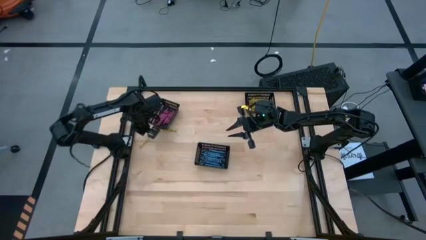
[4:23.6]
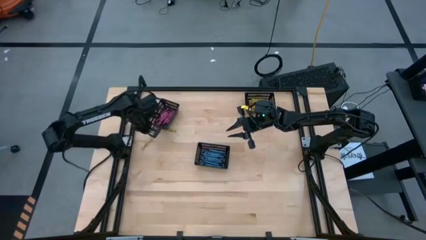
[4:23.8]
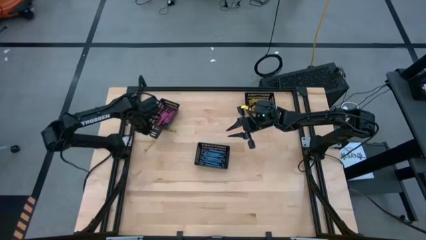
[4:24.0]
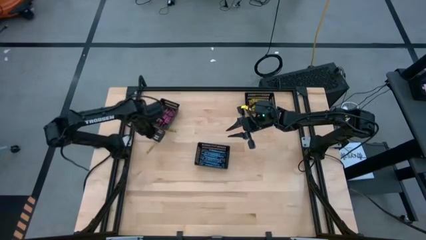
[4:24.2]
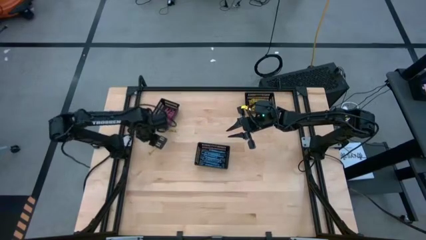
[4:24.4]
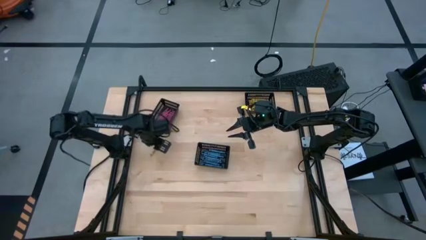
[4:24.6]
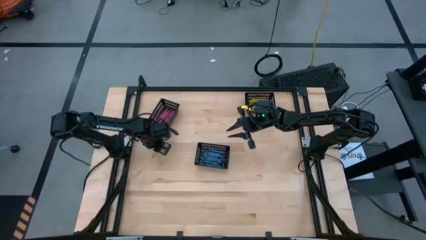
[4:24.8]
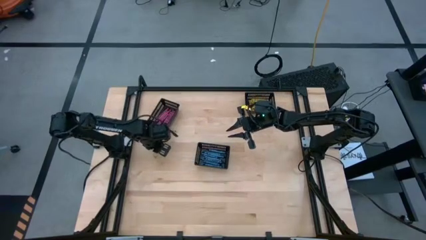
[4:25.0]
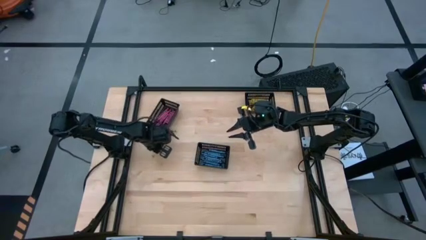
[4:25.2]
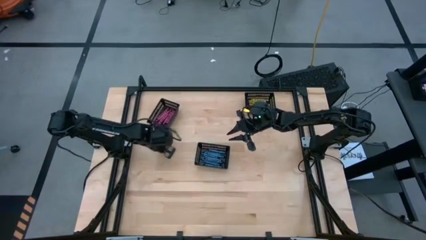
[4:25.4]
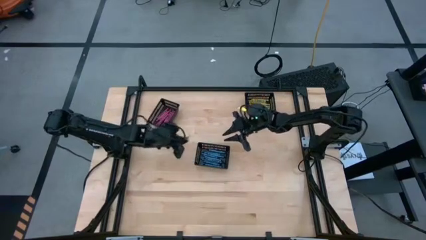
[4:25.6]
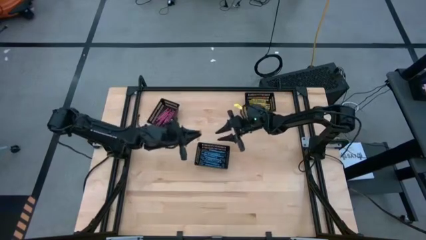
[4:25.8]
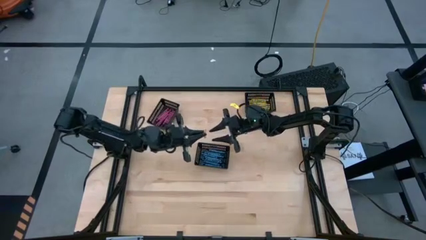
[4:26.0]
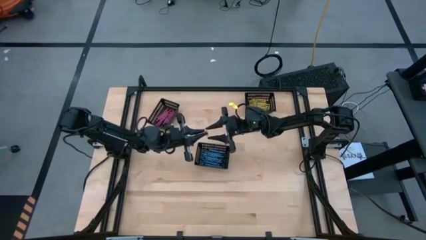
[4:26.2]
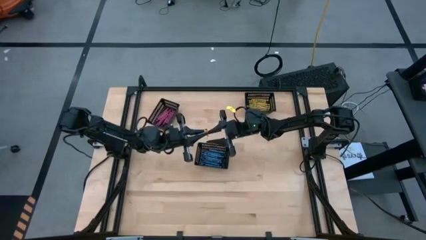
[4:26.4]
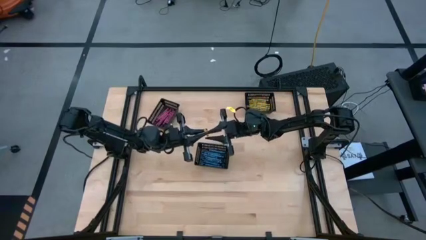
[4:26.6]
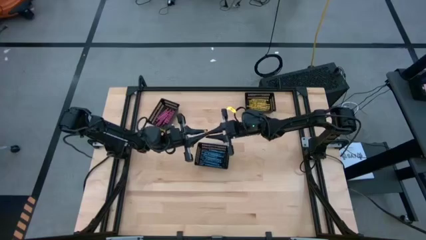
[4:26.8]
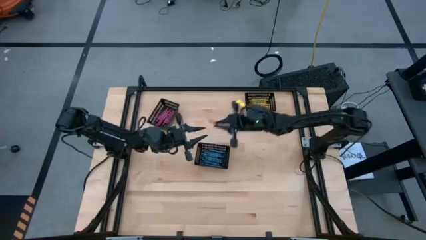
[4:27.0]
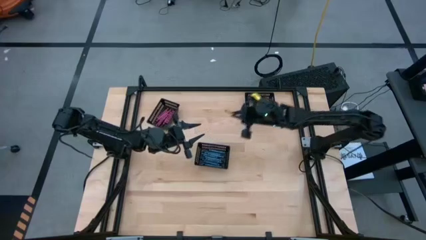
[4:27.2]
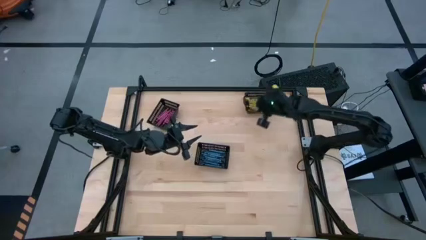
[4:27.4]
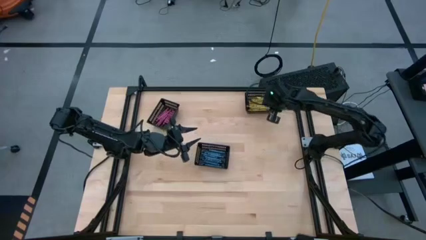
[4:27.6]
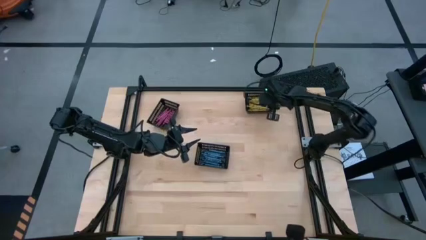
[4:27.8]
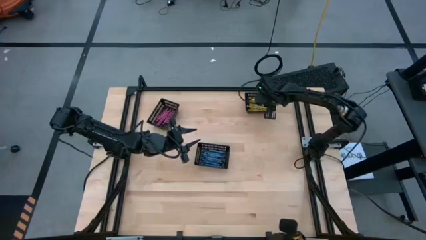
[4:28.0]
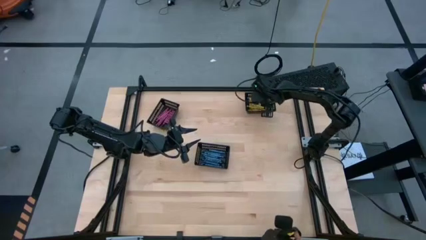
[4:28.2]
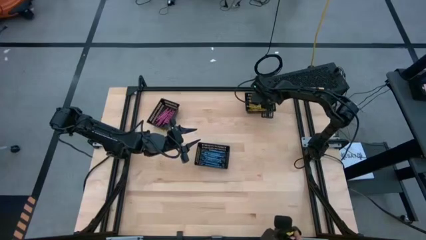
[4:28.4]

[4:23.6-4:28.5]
Task: Sort crayons
Put the yellow crayon into the top right black bin

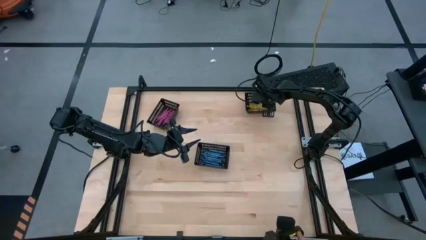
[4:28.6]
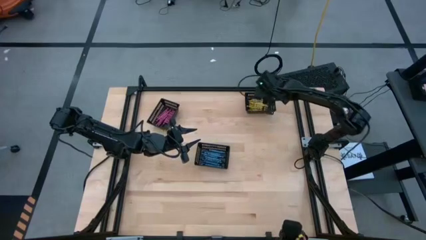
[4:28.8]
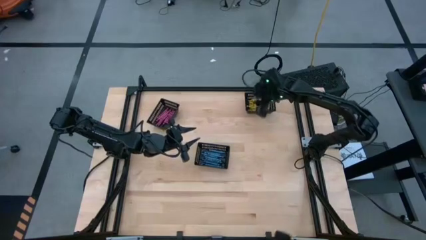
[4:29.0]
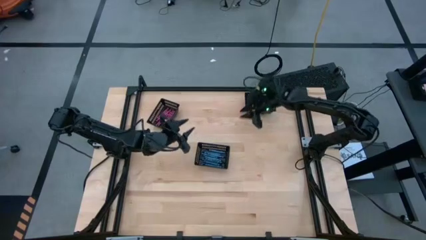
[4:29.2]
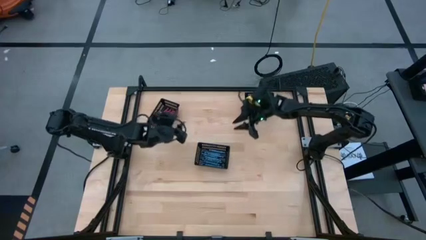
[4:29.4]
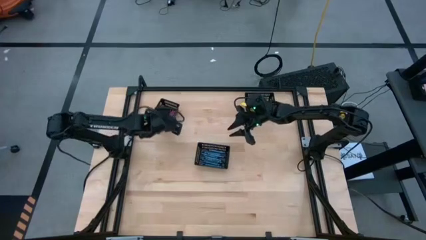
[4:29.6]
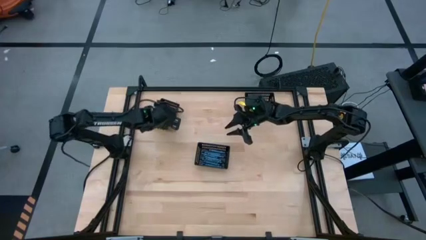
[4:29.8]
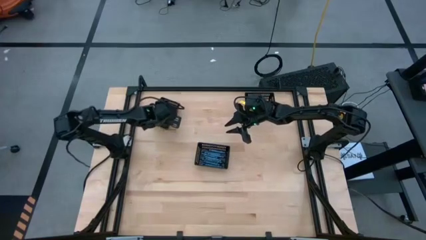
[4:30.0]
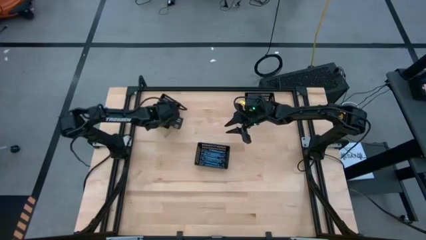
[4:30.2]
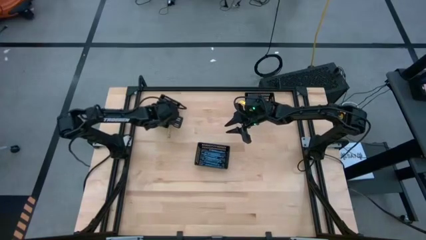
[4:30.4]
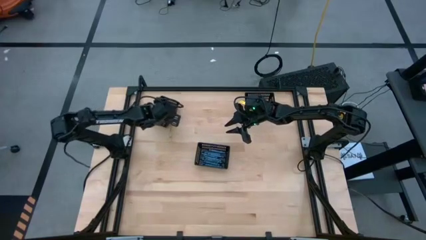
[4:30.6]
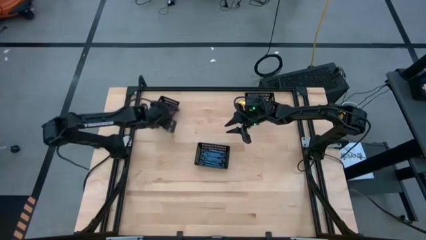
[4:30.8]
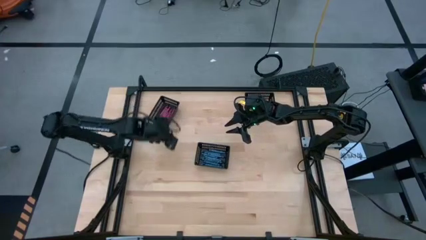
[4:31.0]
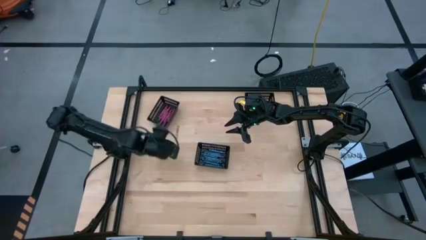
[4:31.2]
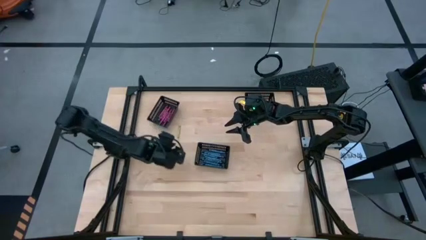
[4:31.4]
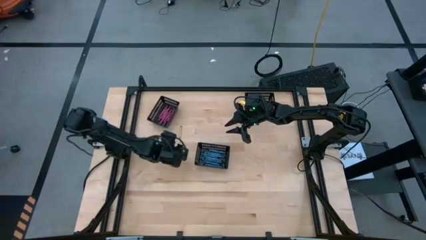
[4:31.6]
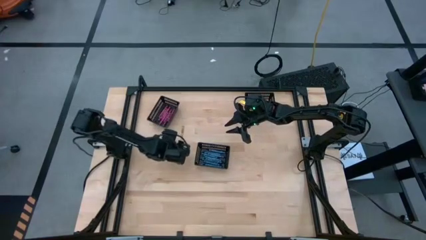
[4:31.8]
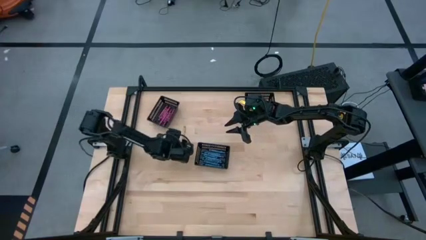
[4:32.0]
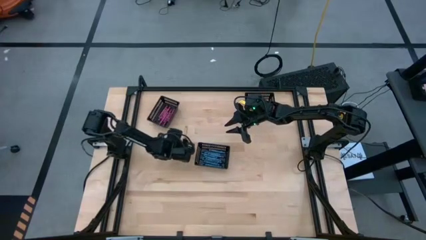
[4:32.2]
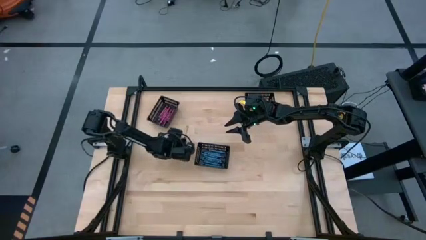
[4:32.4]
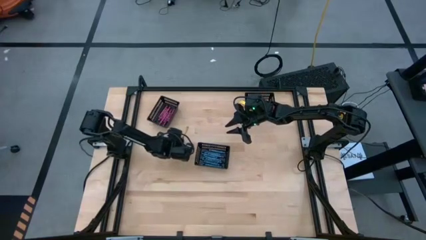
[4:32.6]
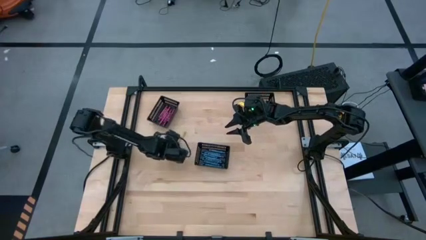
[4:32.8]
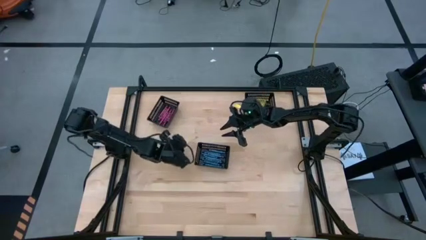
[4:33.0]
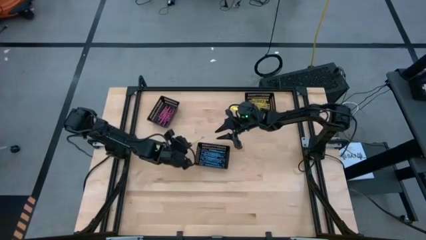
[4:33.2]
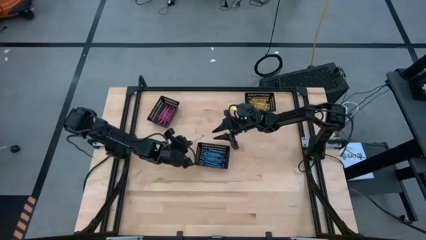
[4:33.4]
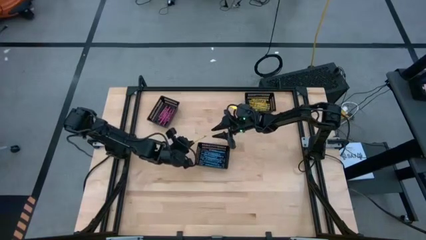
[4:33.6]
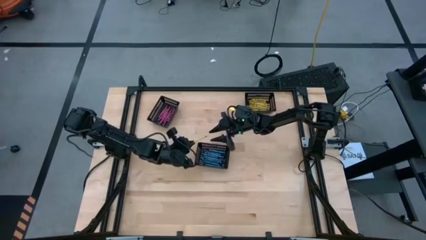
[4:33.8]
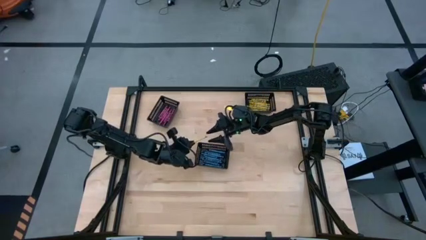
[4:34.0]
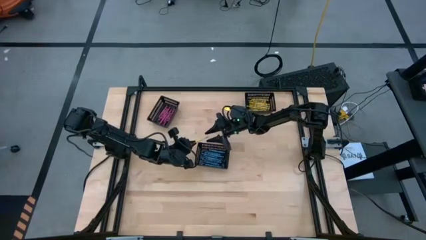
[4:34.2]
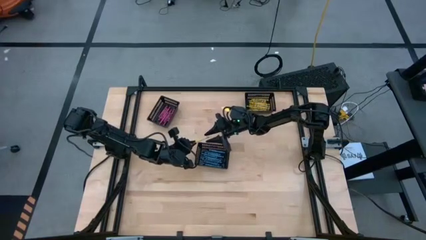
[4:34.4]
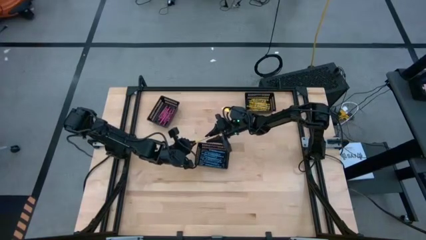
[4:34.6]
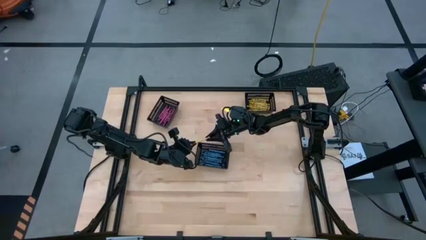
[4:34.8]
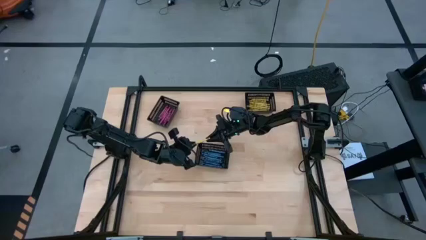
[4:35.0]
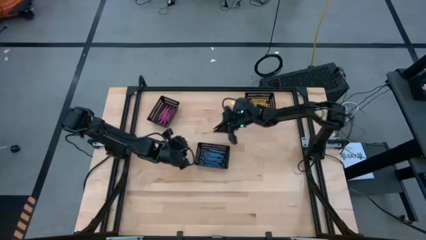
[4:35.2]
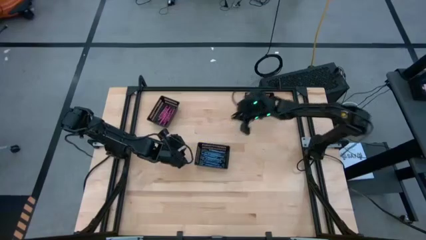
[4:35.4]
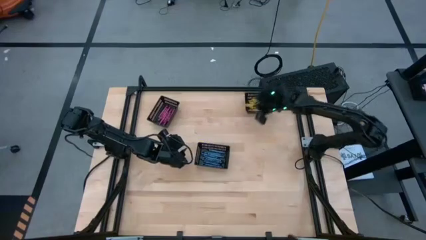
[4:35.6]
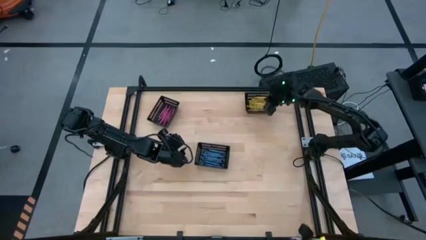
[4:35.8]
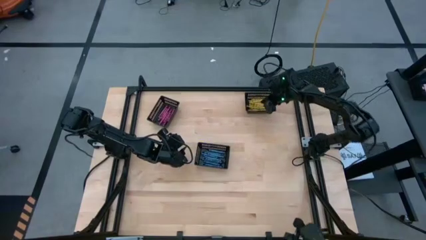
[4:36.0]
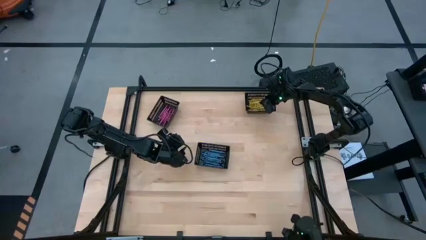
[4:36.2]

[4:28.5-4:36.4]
Put the yellow crayon into the top right black bin
